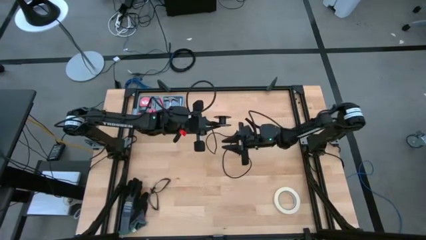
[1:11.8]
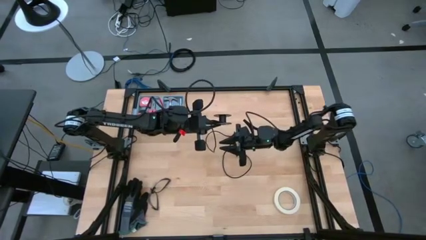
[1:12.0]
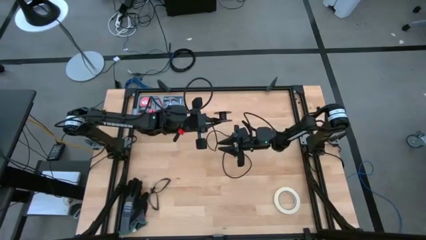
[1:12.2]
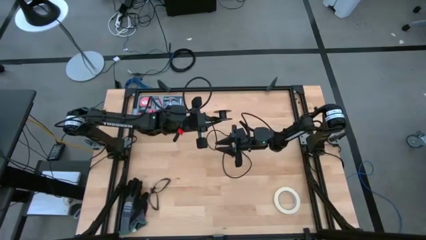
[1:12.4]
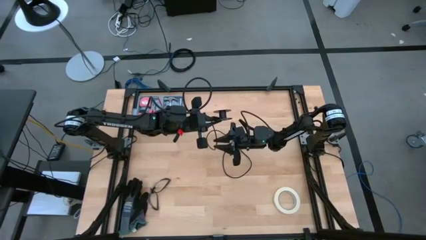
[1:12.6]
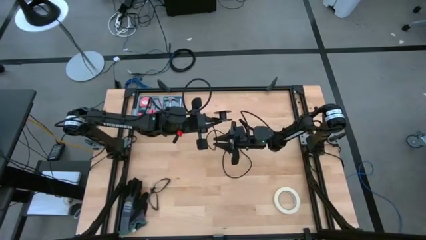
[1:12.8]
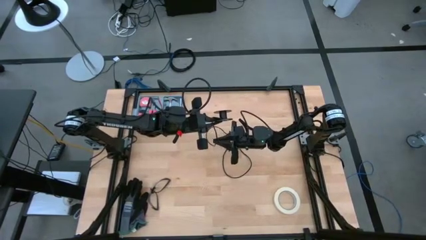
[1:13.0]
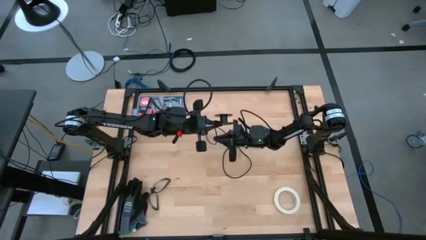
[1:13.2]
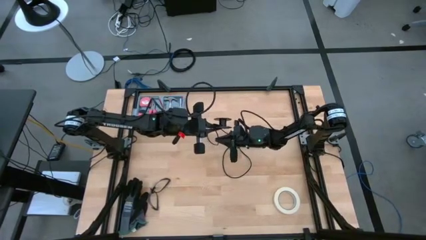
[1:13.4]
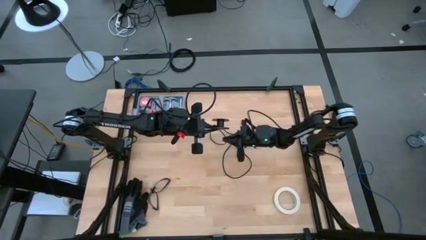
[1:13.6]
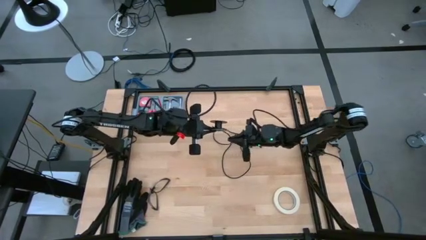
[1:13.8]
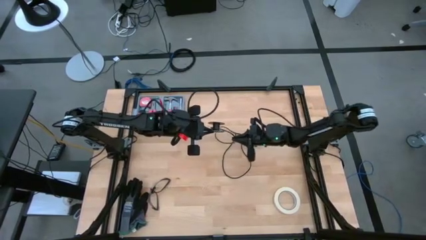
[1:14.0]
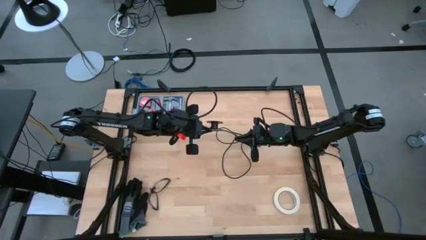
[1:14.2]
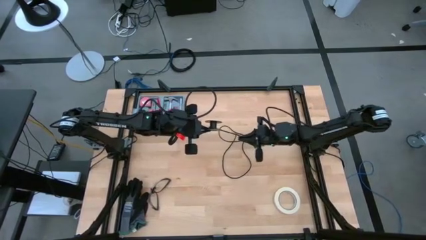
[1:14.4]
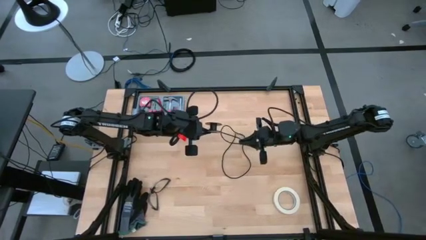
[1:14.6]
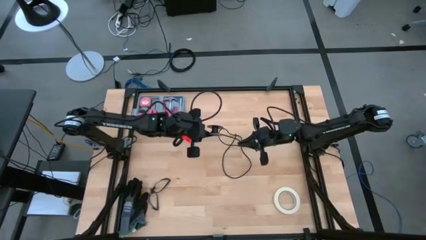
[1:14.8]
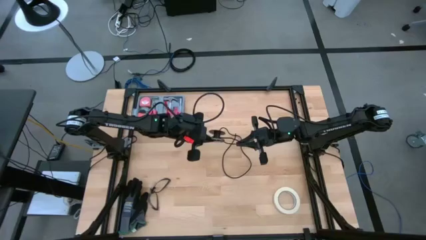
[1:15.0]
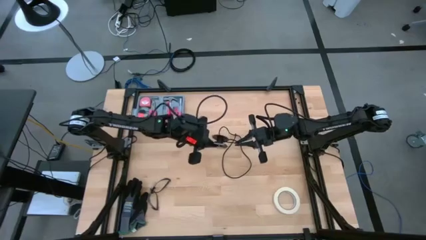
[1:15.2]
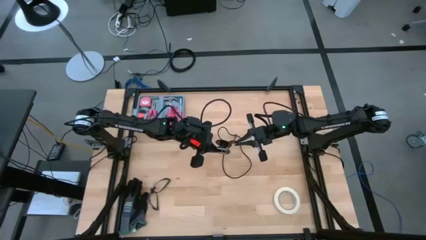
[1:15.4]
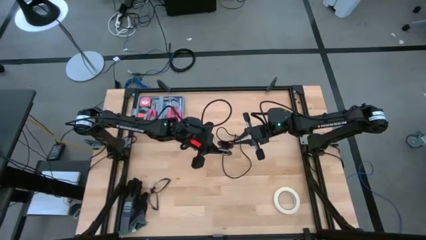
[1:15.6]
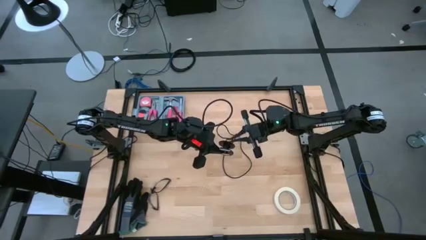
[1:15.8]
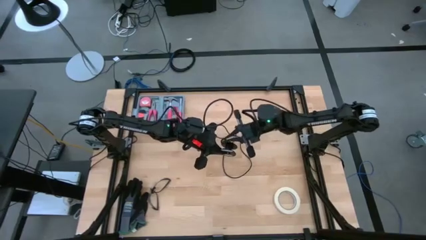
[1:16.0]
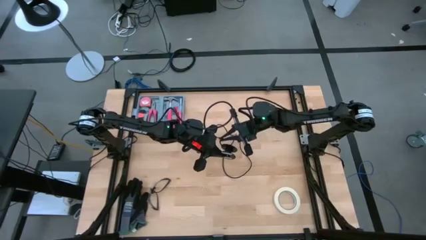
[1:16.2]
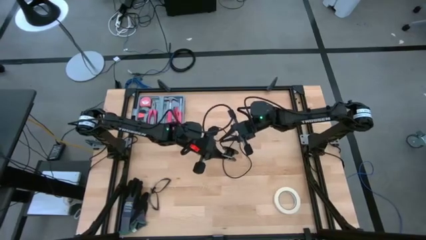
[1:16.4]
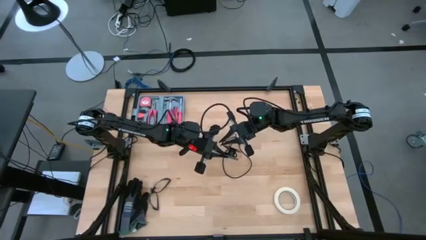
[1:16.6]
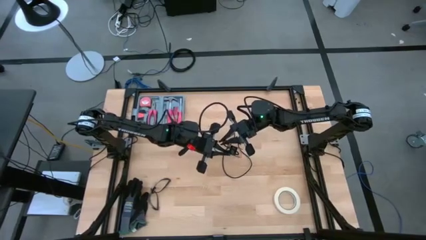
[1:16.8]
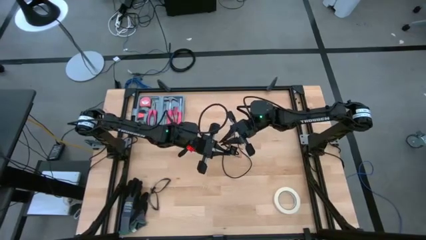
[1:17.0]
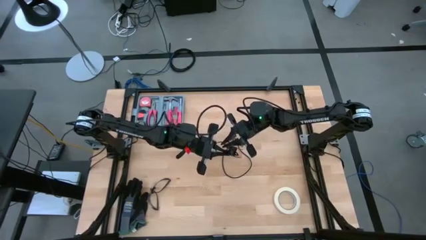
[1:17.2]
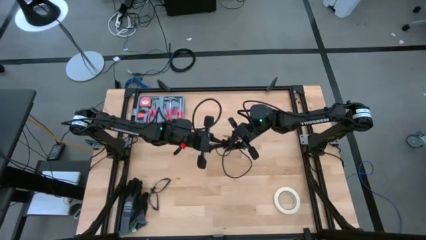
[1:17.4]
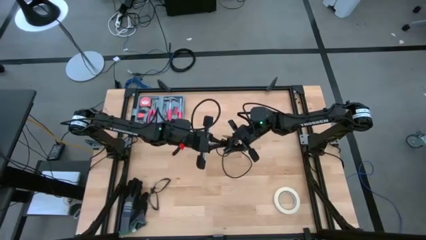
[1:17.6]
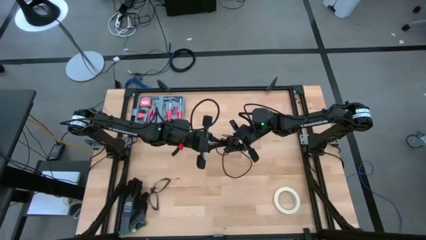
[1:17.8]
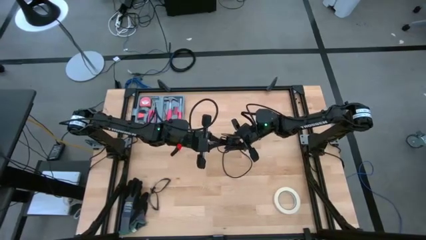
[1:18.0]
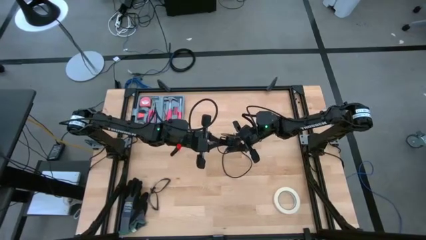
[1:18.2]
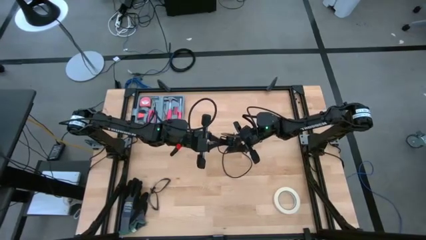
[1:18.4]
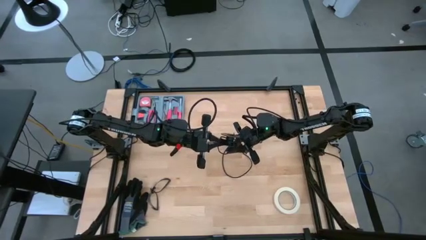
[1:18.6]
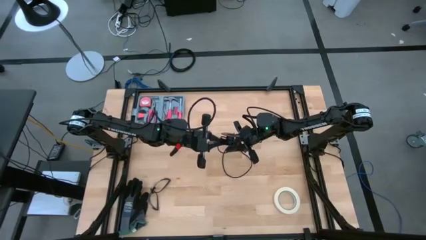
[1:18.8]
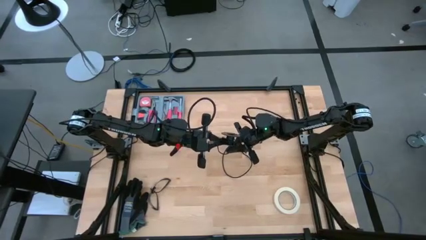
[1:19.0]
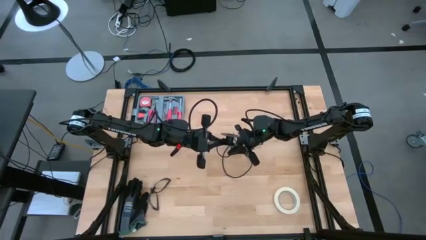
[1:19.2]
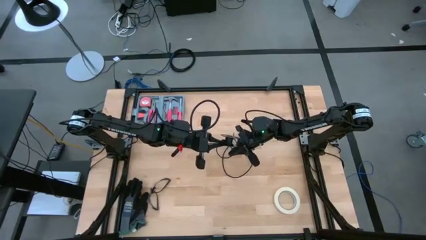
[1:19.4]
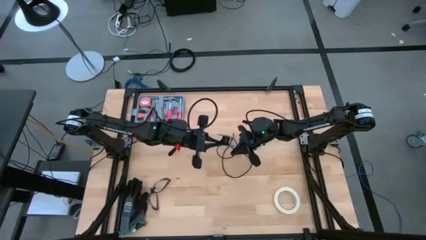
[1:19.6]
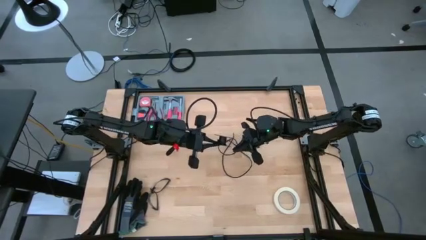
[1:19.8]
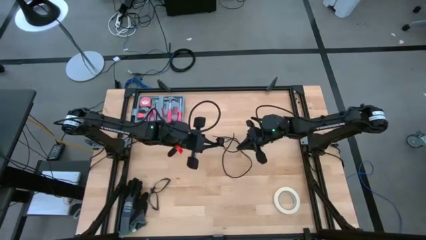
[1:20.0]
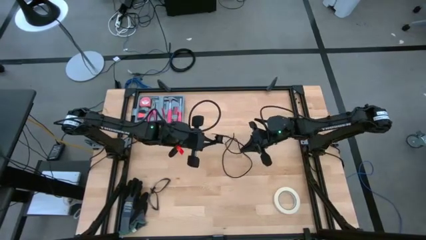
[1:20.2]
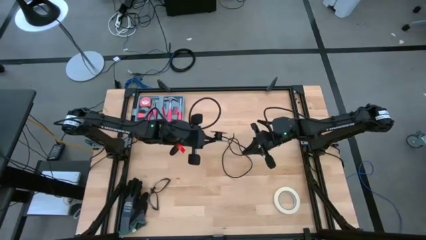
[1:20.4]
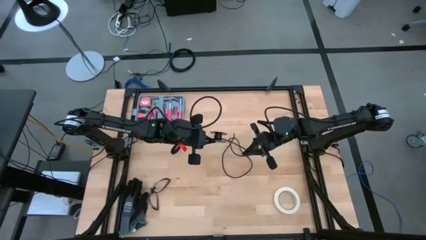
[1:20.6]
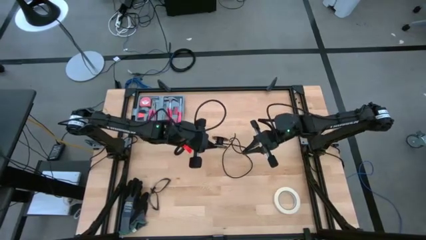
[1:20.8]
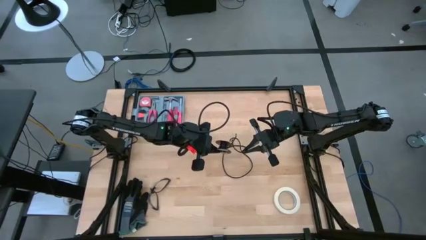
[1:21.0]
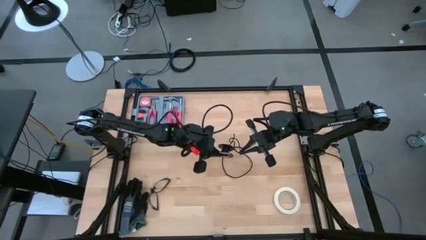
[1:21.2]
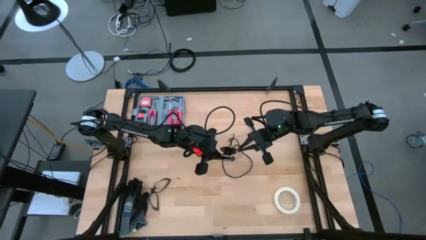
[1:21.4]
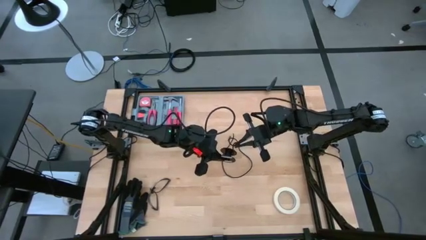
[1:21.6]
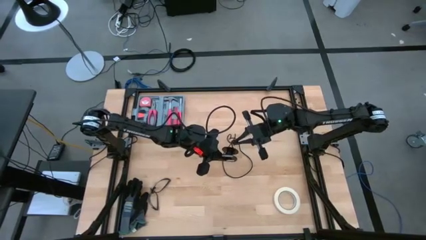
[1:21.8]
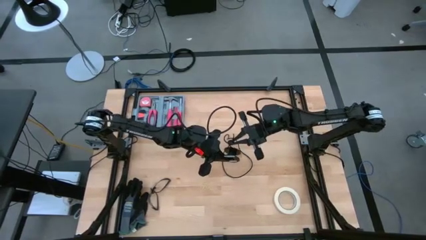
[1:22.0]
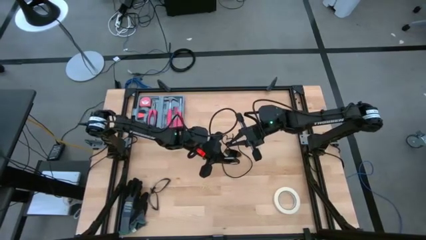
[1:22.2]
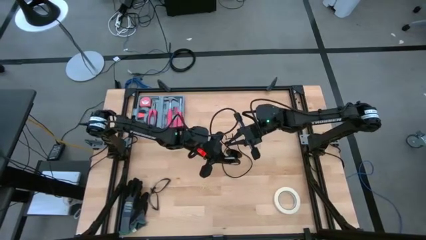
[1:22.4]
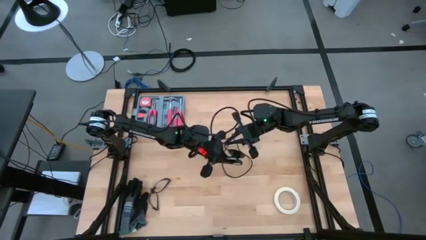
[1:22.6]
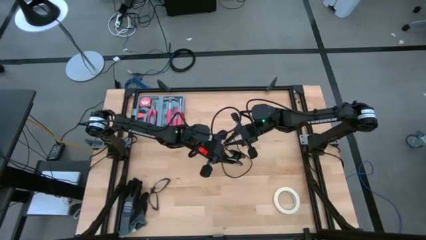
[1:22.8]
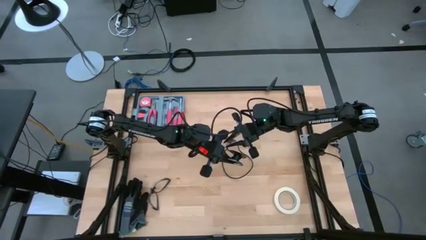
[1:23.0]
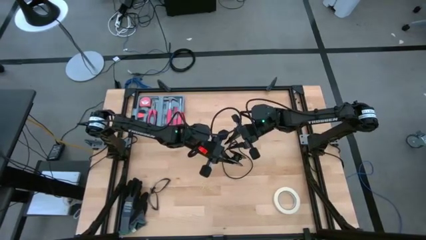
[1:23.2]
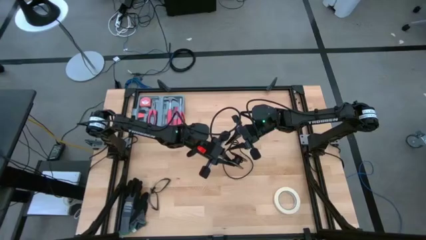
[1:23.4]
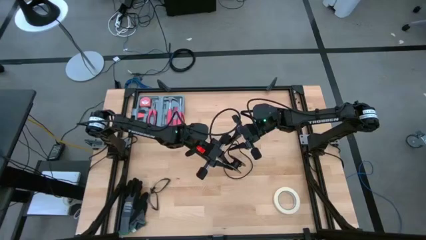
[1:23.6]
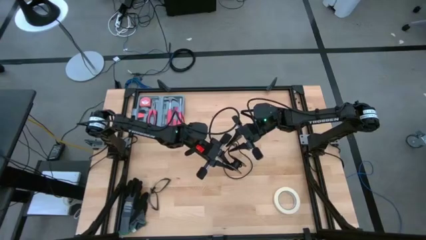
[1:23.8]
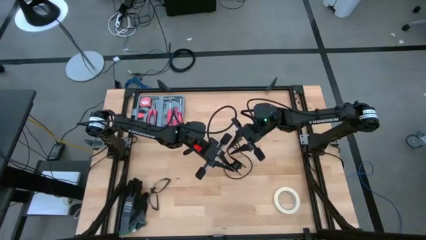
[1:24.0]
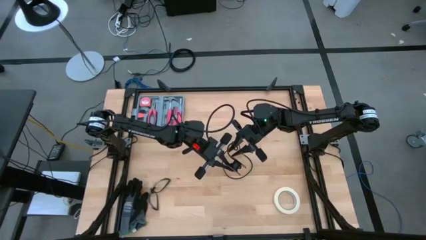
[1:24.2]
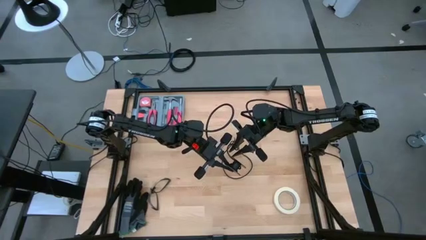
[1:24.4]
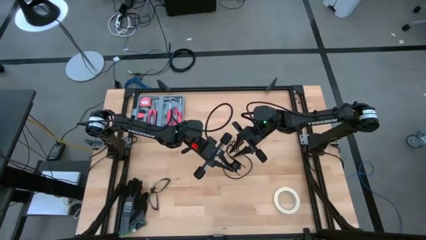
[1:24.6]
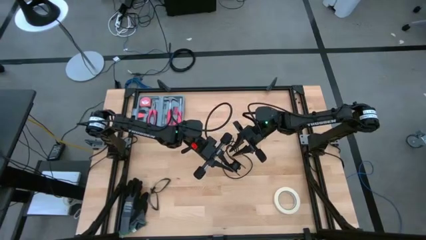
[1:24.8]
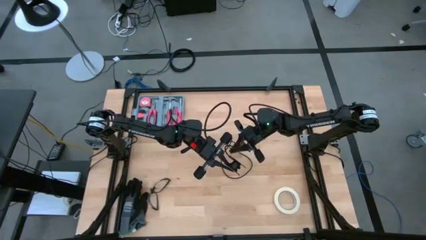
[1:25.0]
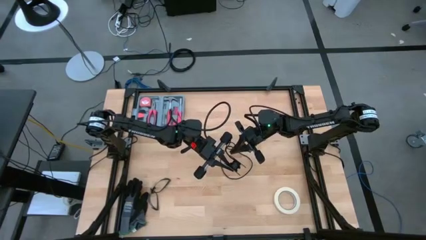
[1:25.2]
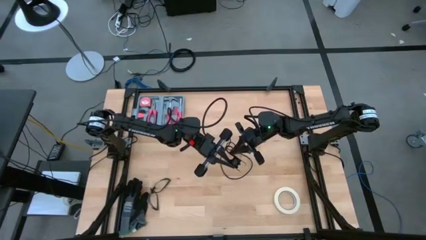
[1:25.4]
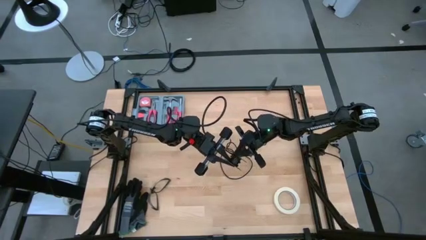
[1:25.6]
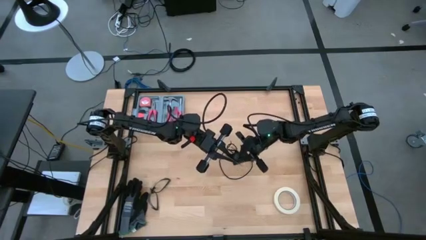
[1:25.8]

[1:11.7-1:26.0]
Task: Coil cords
Coil the black wire onto the spool
